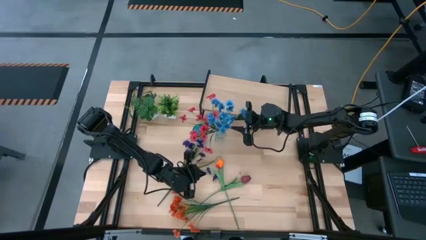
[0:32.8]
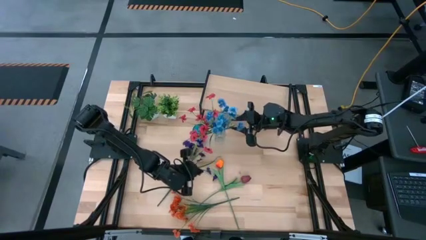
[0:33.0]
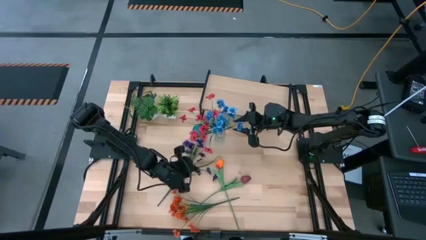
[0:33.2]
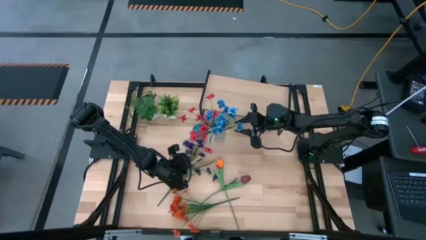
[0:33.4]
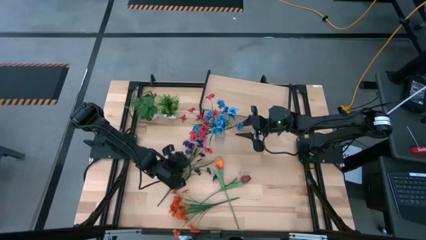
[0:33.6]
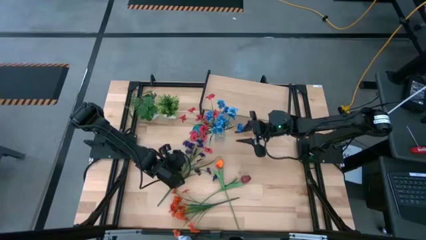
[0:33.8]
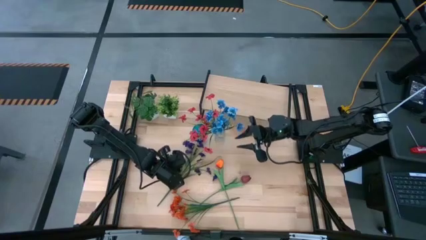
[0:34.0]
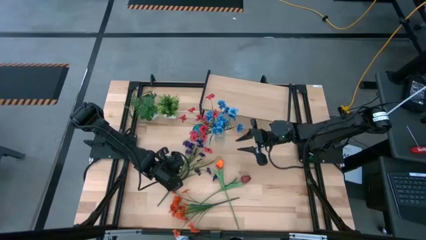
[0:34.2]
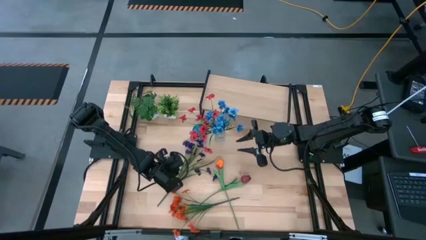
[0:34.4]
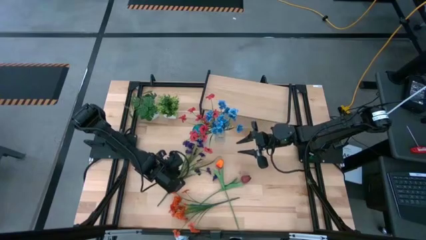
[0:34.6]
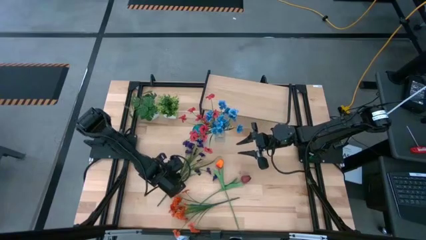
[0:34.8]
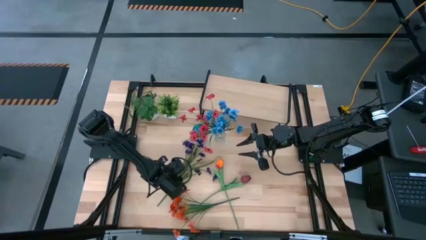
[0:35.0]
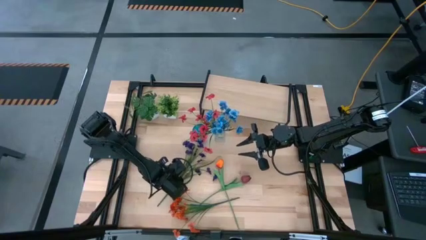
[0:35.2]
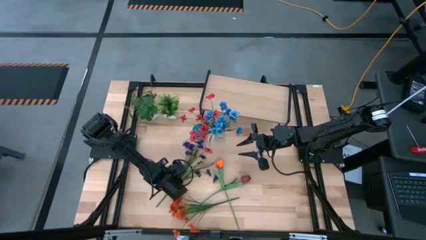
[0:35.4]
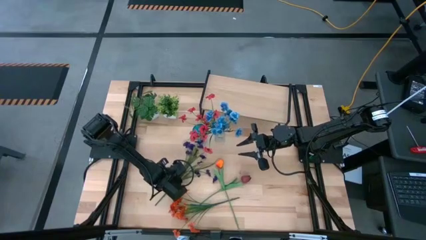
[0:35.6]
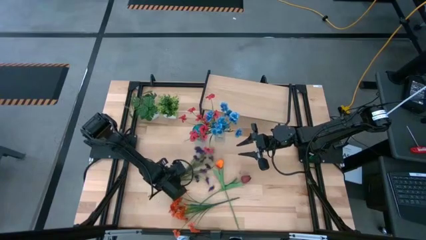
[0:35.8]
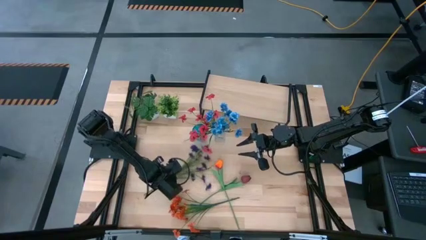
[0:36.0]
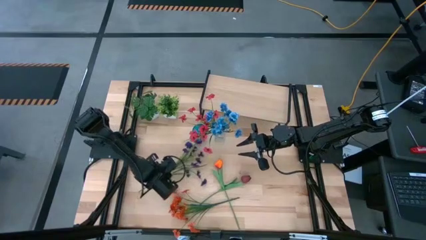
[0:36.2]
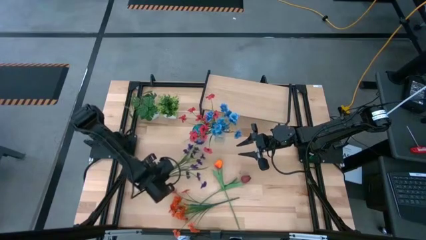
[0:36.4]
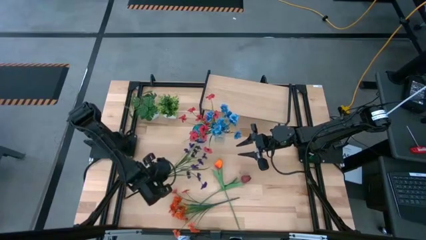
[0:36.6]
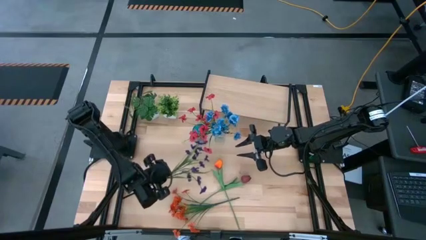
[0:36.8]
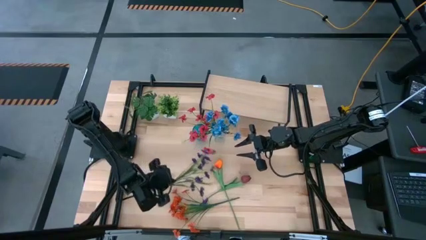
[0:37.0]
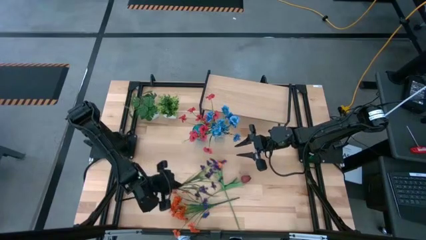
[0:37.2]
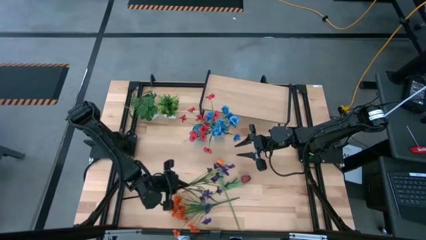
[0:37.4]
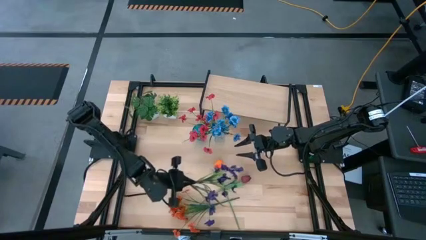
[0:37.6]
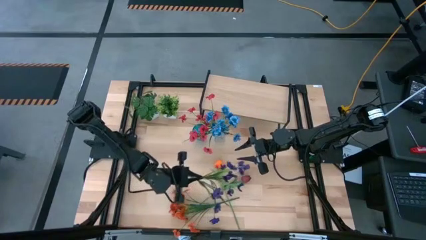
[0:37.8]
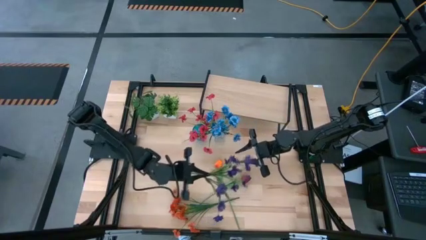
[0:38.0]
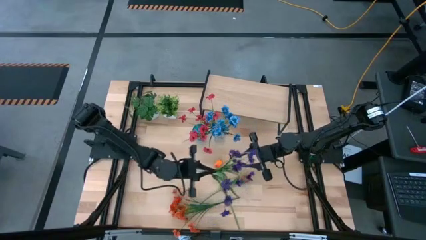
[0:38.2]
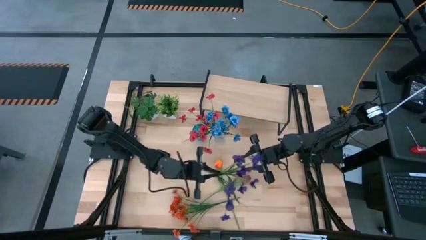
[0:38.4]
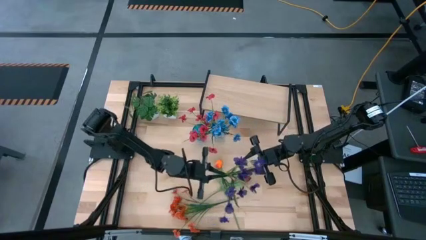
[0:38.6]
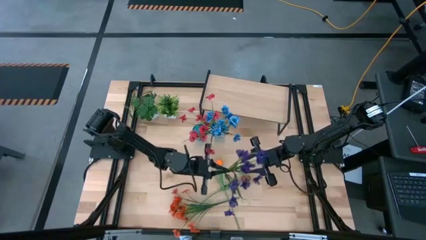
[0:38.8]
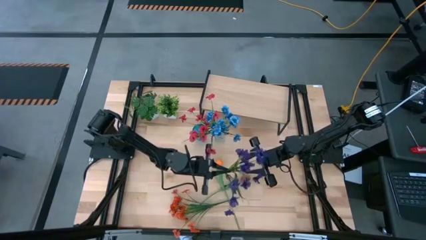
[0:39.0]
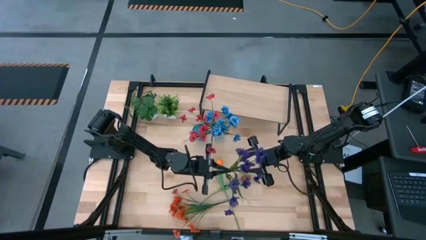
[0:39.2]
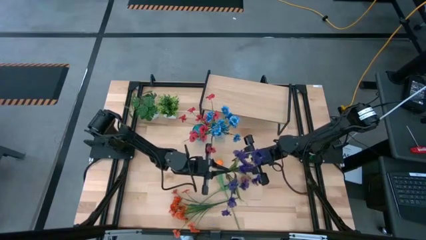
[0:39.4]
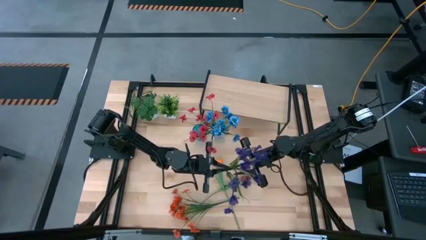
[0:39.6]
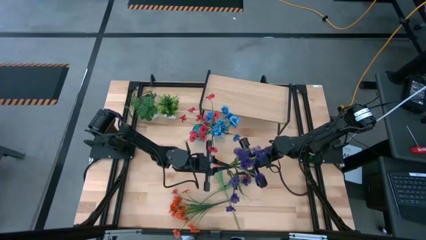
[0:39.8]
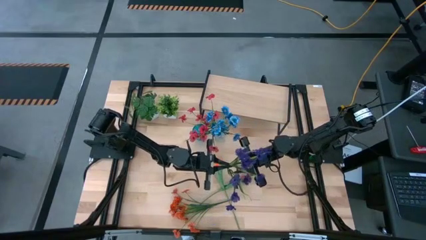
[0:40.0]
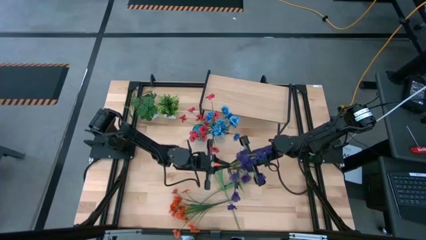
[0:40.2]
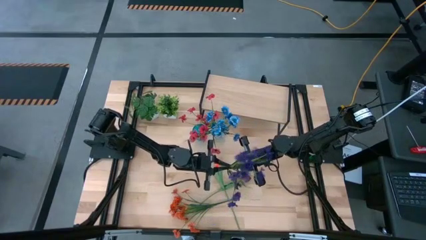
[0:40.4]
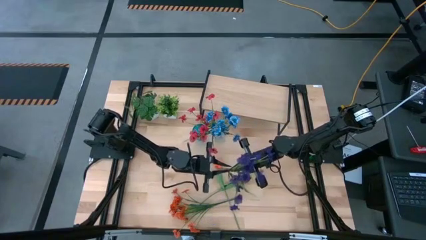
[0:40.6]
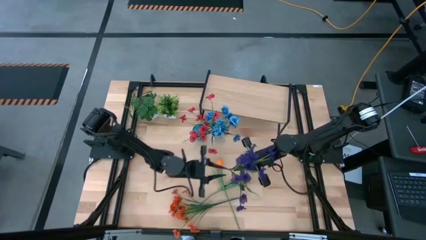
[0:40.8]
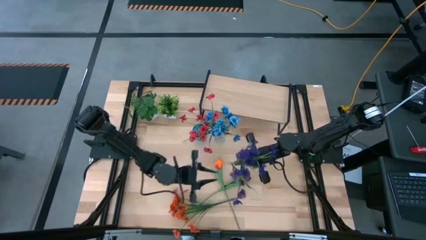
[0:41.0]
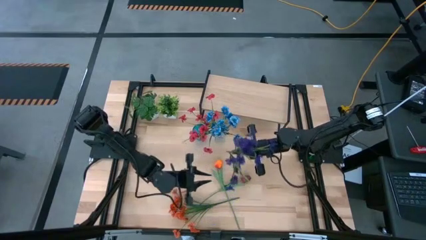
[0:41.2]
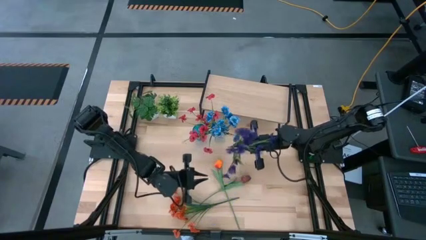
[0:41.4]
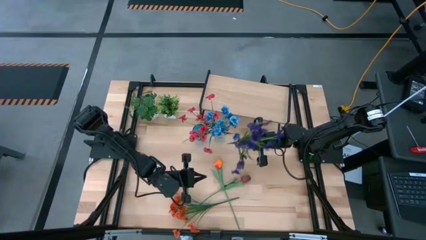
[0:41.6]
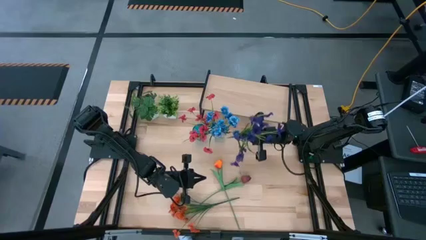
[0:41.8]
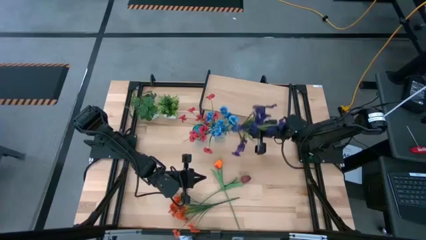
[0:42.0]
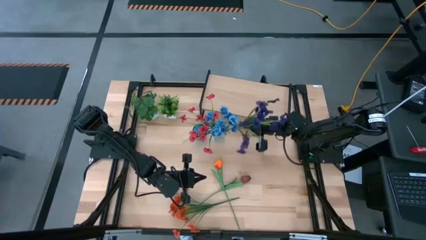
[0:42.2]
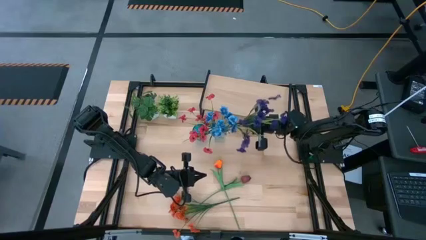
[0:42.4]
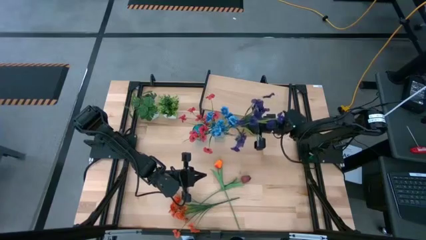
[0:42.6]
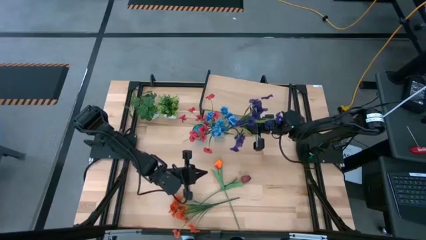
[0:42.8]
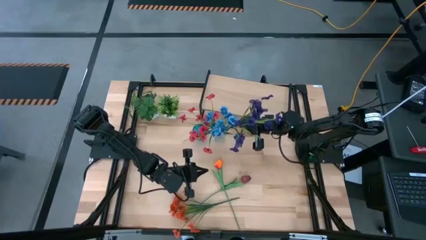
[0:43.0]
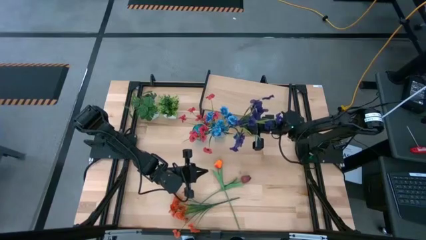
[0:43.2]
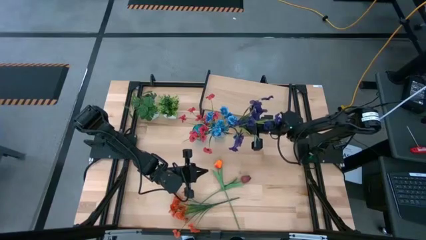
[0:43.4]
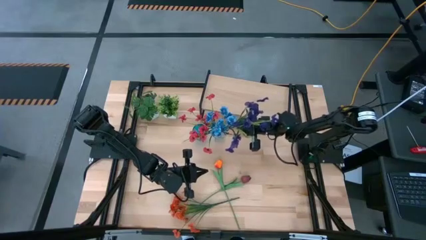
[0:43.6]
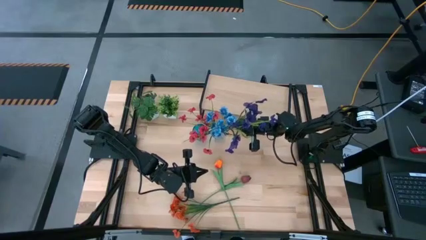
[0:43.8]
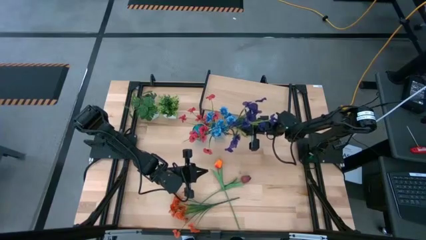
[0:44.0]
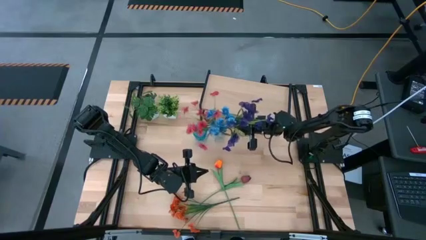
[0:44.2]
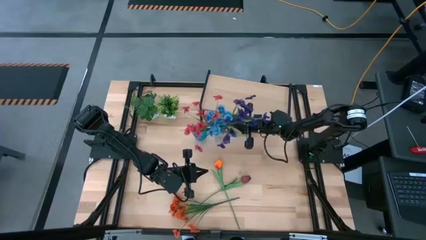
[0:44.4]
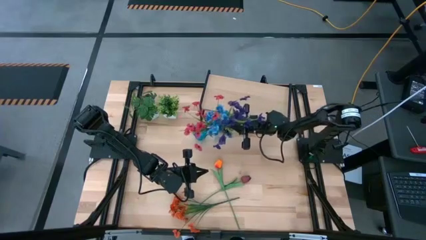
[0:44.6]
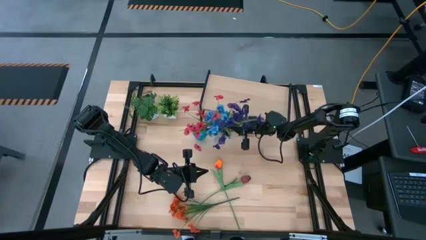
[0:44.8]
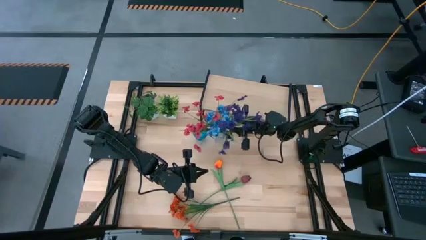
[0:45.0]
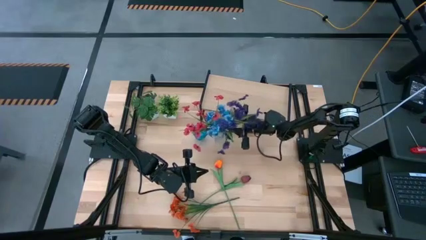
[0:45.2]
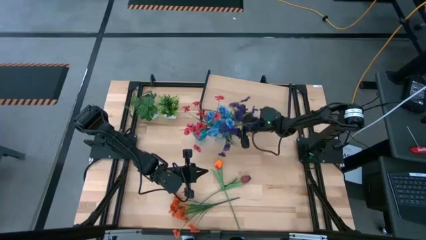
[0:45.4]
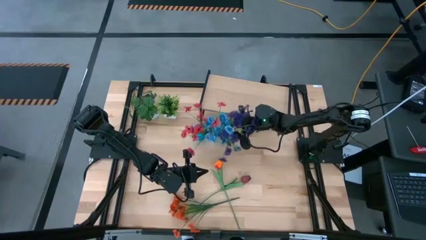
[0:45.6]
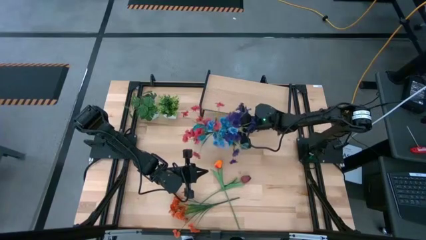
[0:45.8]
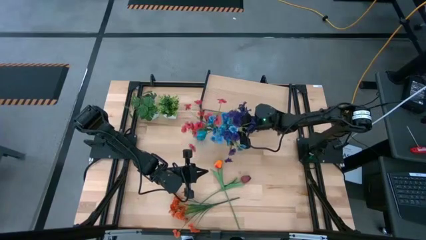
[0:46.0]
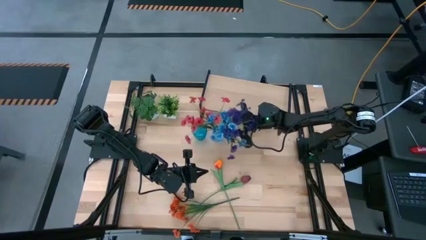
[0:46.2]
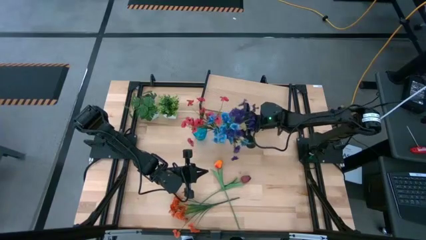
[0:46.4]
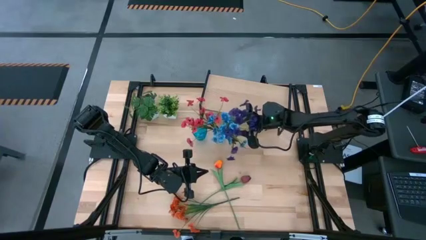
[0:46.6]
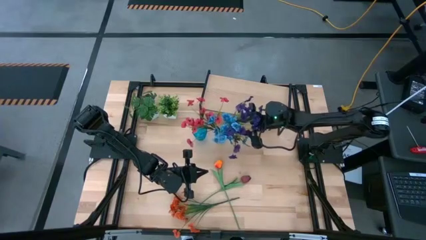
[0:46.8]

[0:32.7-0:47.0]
Task: Pick and place flowers into a vace then onto a shelf
Put the purple flowers into the transparent vase
